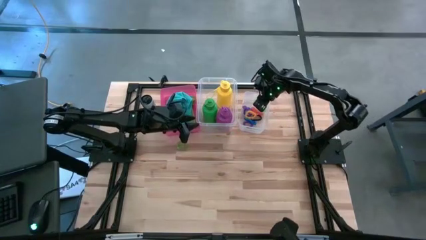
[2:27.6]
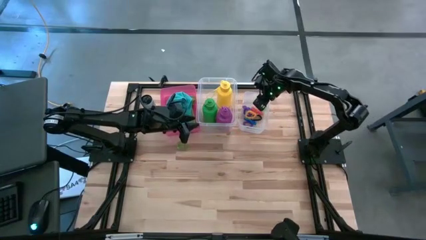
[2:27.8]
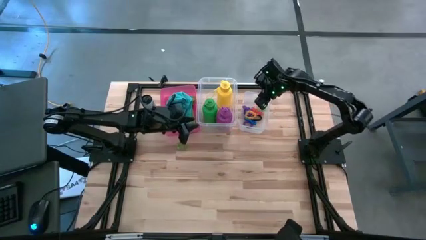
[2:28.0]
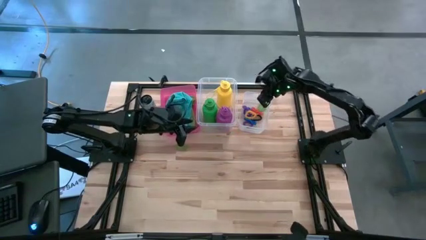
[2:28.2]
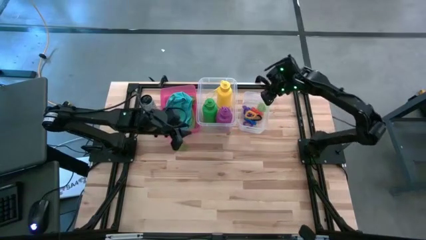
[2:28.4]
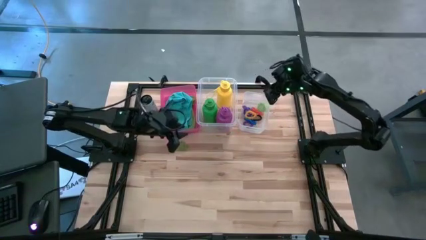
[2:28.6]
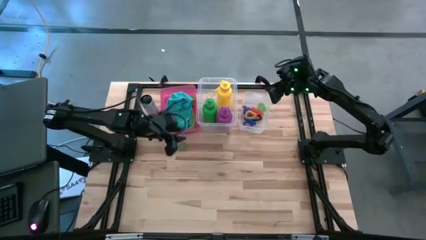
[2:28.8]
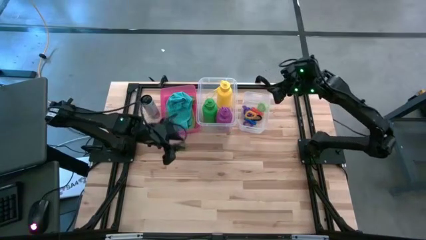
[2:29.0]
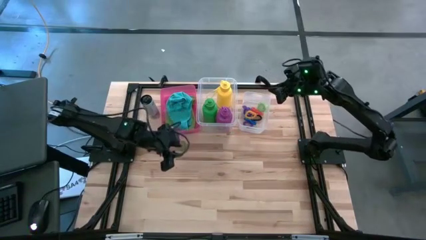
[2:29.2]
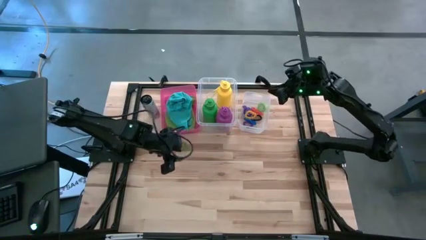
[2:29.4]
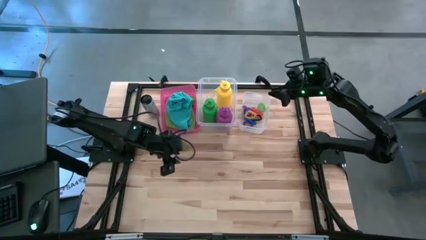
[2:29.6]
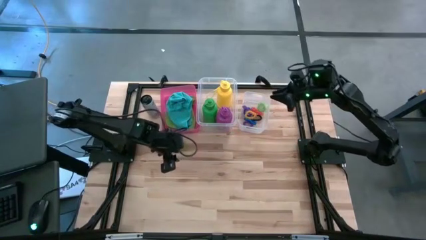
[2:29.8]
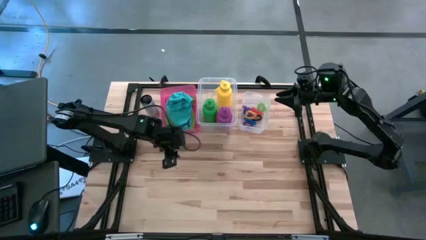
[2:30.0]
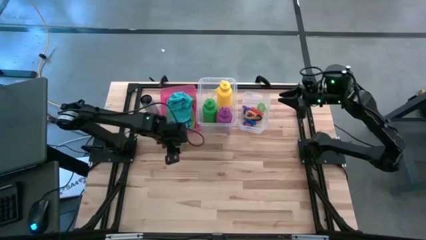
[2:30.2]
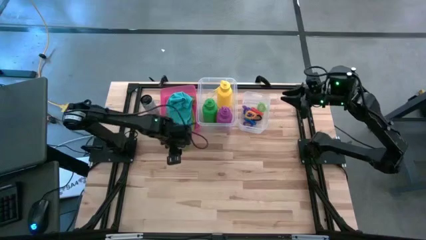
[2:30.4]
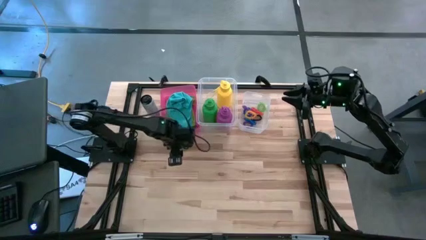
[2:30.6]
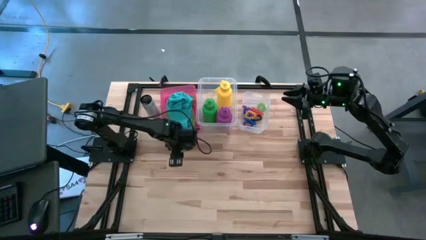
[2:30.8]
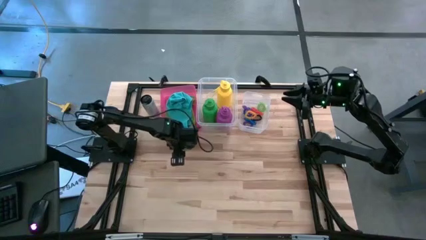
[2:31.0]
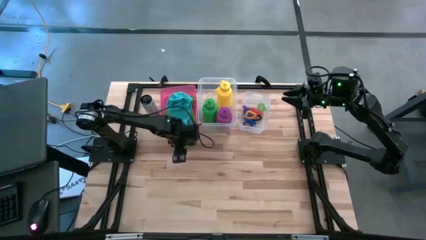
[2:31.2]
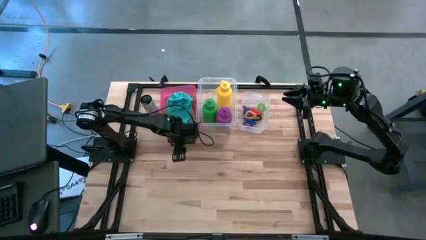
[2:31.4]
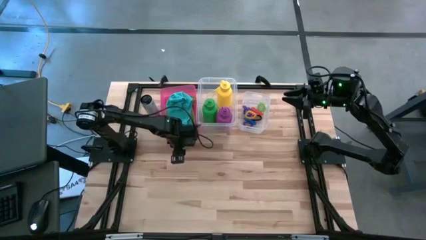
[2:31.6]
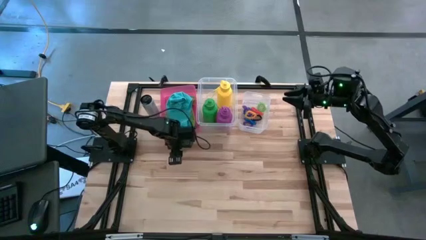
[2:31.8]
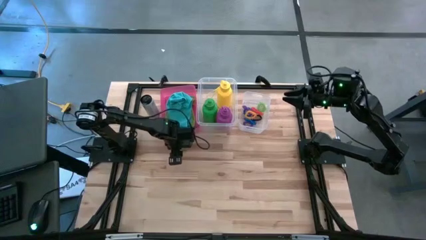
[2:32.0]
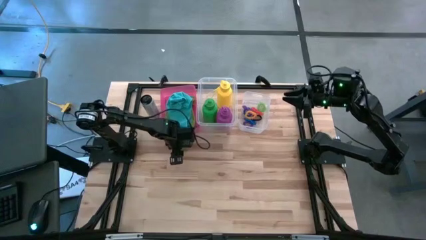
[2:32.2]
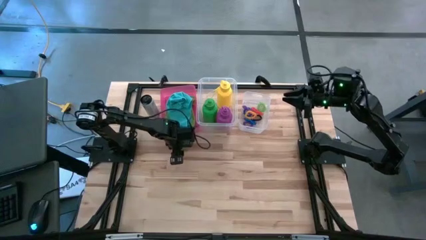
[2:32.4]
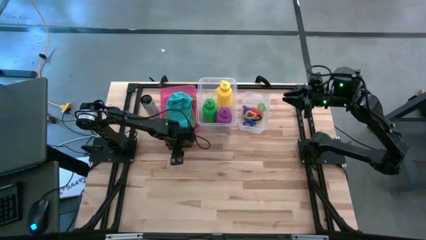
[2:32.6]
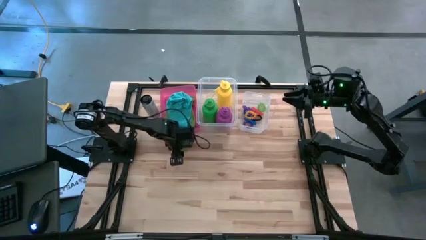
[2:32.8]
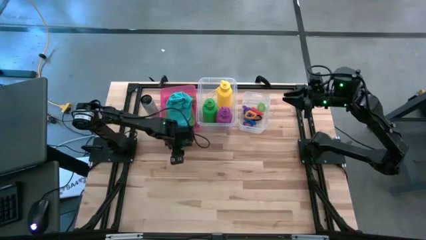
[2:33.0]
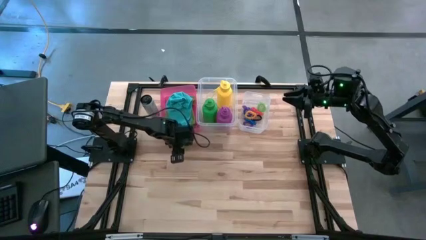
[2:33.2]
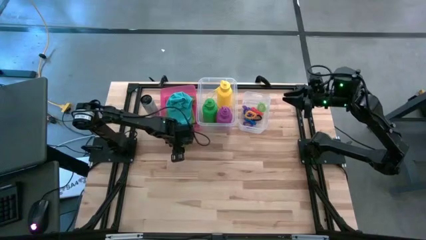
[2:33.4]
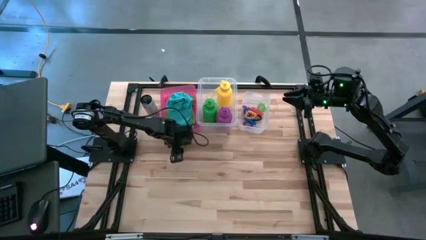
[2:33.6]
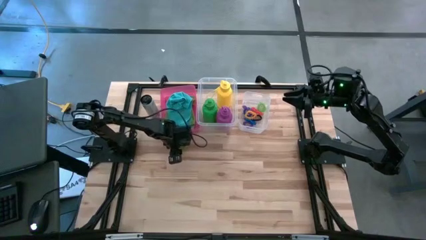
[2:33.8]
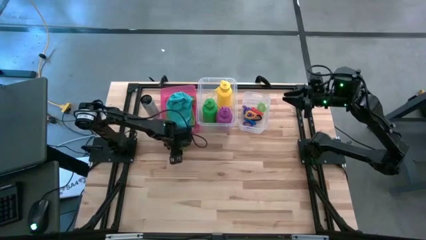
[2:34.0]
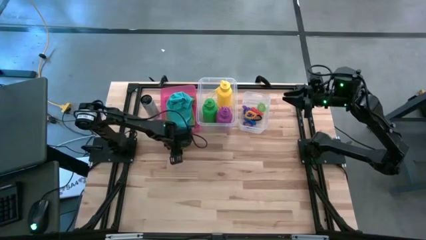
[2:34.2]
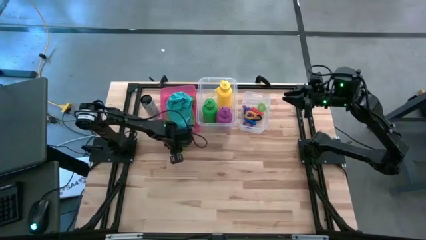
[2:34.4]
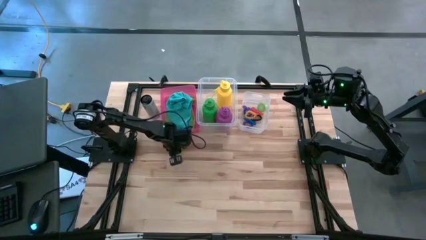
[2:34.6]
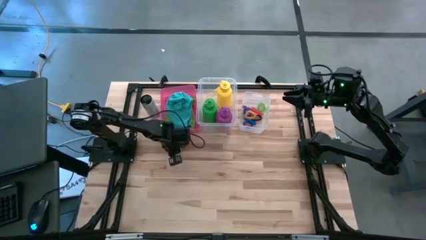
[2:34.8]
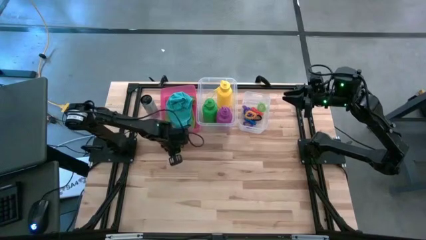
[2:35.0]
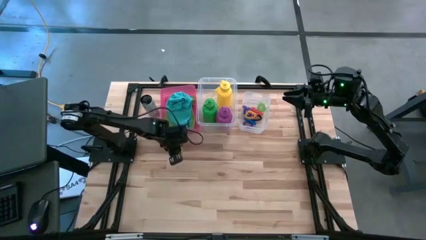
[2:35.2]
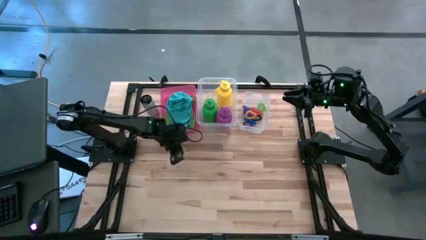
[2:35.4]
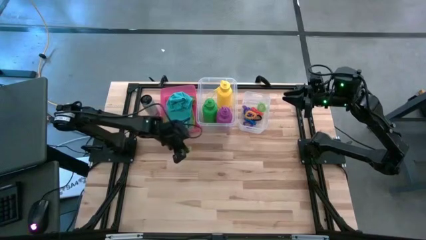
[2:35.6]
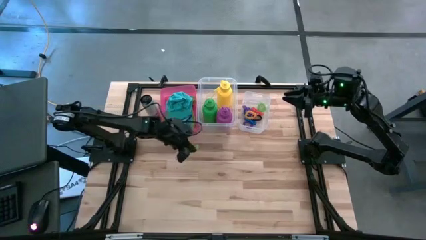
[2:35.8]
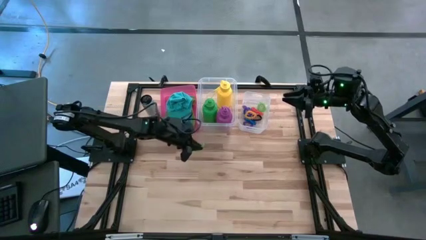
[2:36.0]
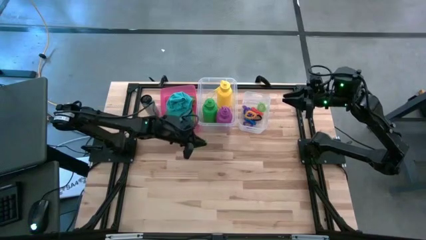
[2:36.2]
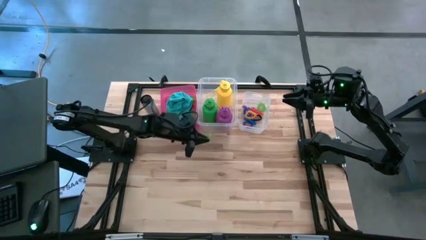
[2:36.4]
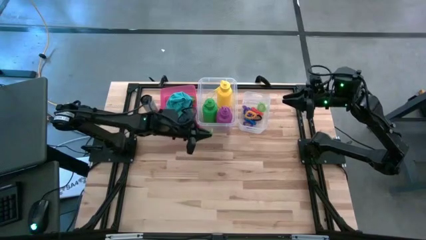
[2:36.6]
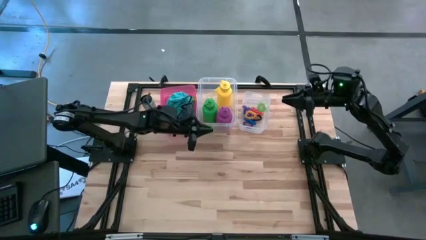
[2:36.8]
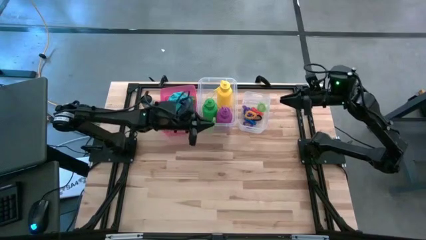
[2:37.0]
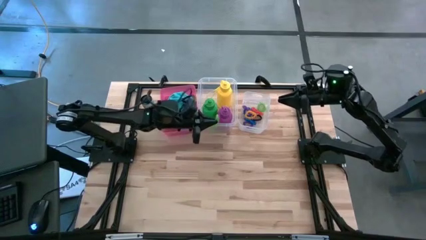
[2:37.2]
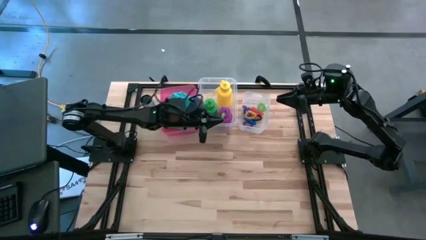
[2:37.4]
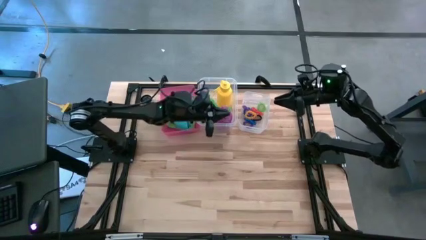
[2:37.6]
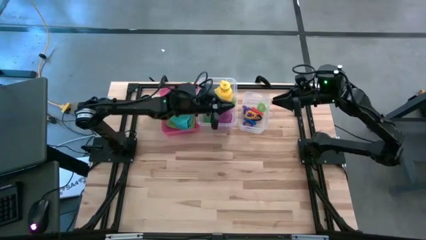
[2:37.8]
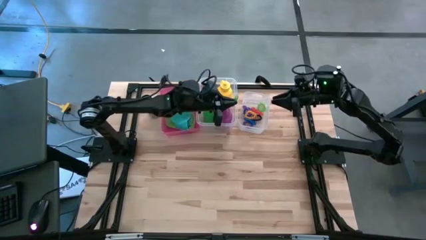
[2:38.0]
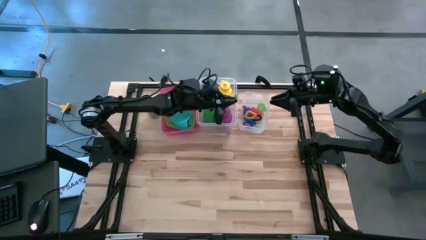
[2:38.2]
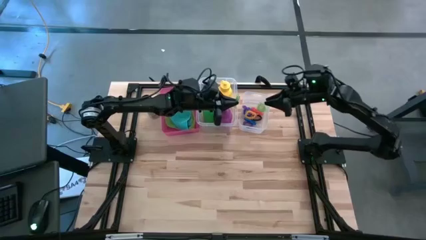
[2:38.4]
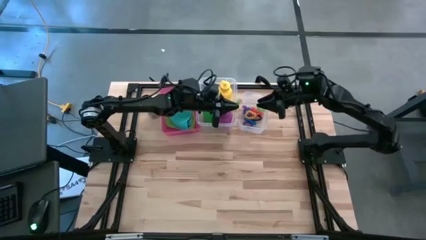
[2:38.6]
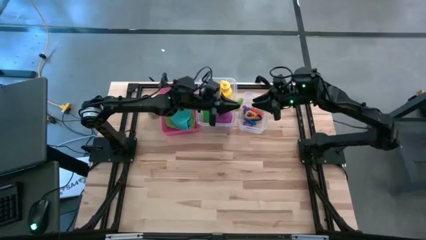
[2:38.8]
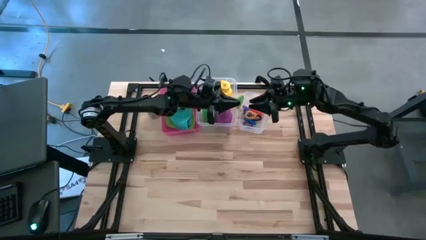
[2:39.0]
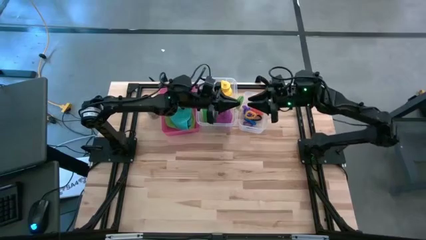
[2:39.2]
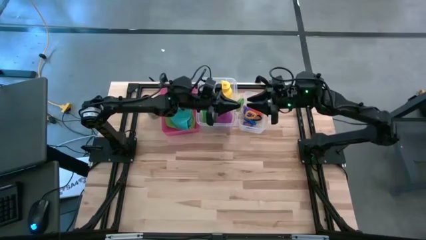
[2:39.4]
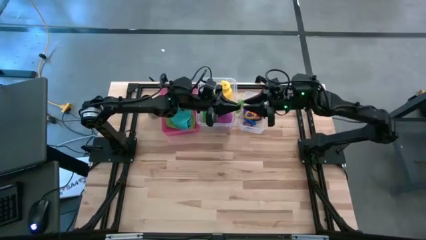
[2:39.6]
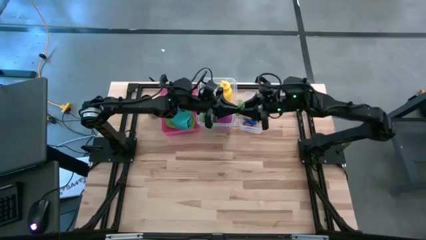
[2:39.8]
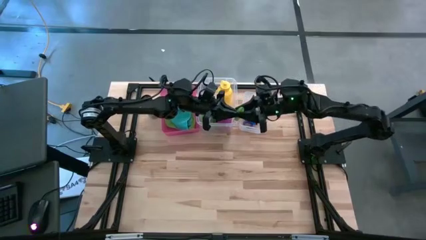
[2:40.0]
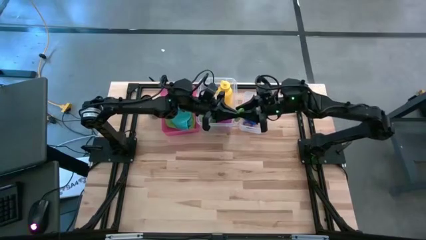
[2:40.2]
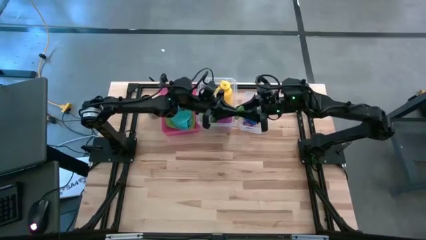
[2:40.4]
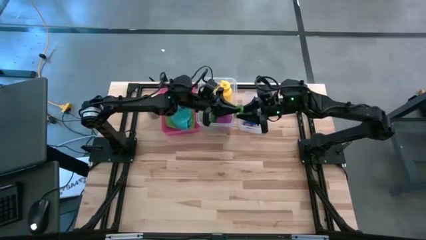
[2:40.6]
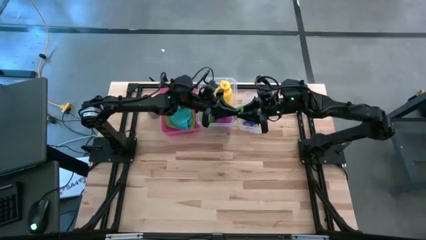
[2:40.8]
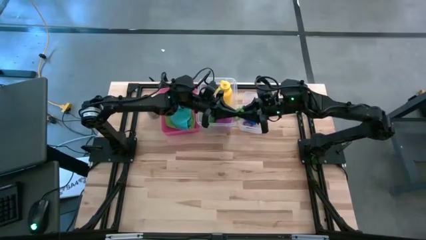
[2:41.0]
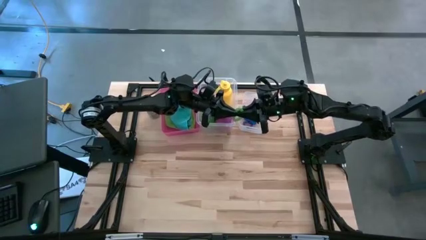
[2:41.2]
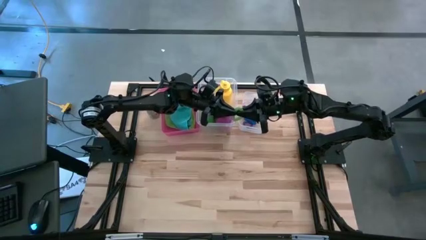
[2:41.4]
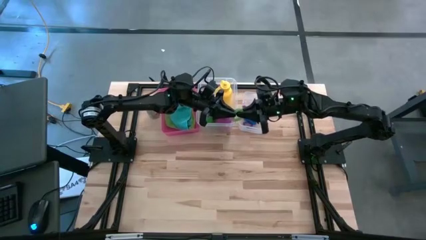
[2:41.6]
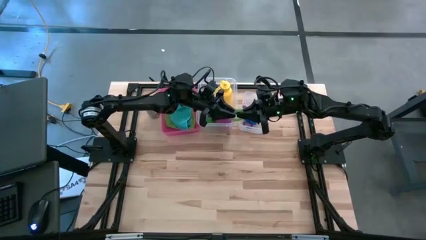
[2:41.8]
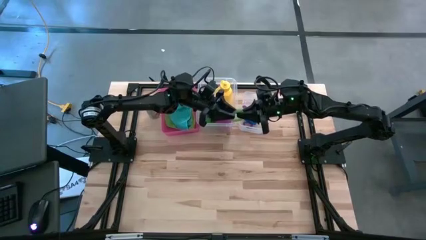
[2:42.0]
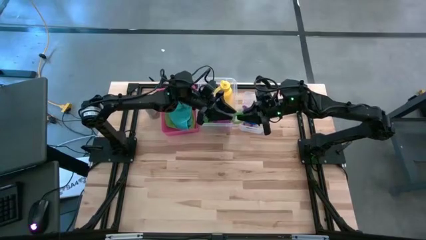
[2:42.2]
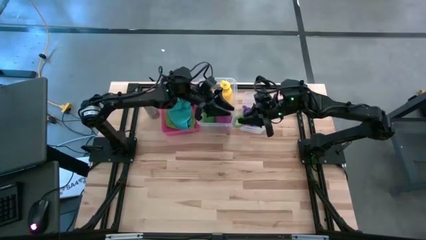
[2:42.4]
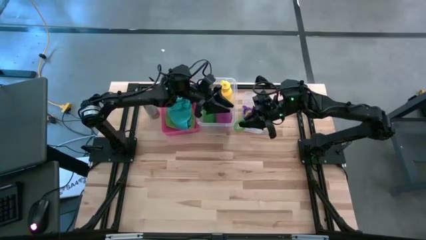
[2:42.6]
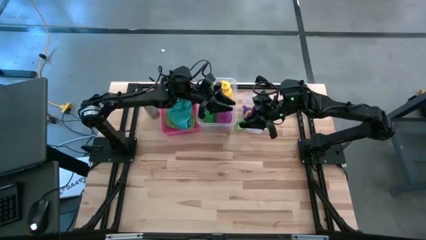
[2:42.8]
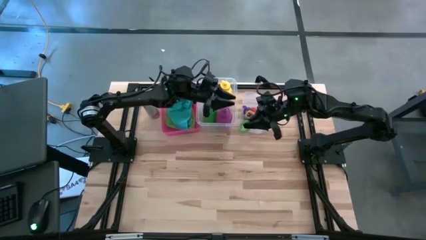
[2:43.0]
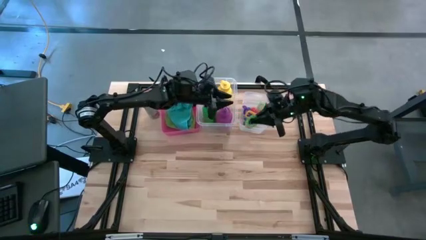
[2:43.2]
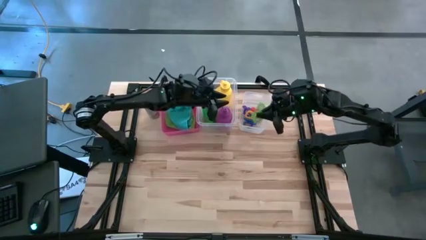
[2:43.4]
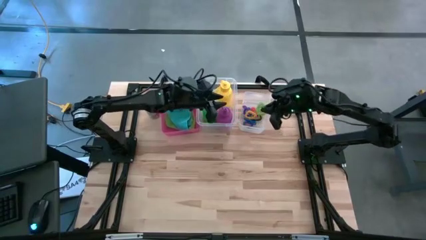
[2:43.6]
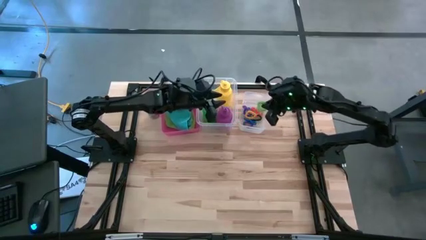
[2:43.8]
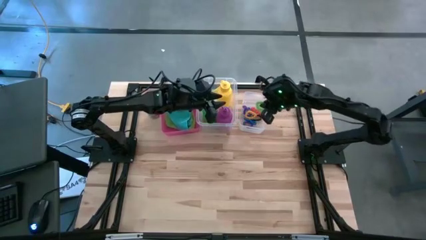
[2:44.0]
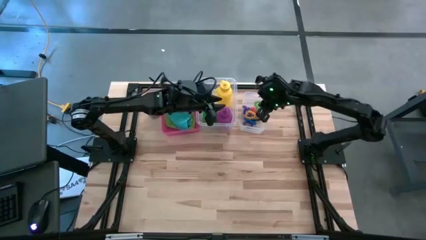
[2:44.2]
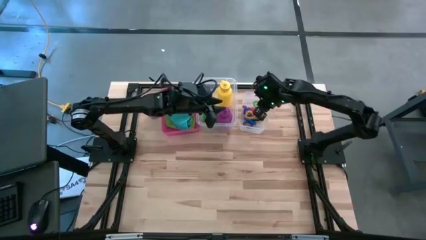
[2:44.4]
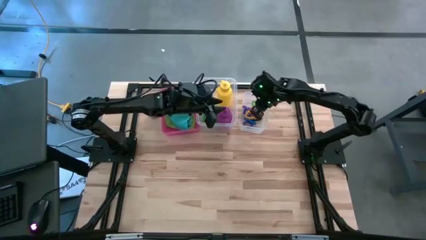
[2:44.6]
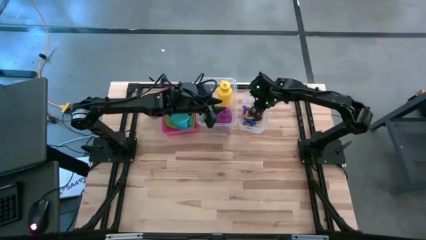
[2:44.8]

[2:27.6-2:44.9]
Task: Pick & Place Sports Items
Put the green spring keychain into the right transparent bin
